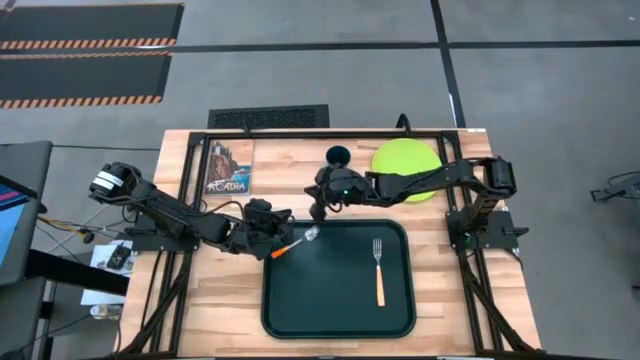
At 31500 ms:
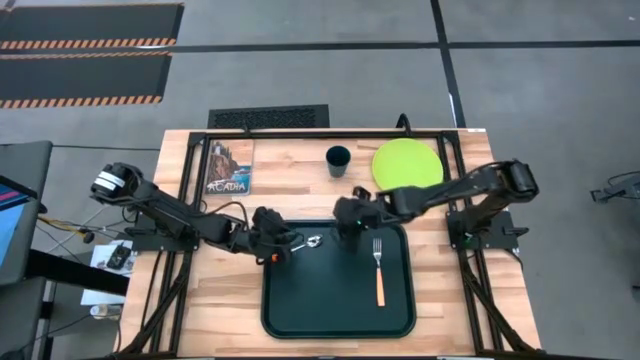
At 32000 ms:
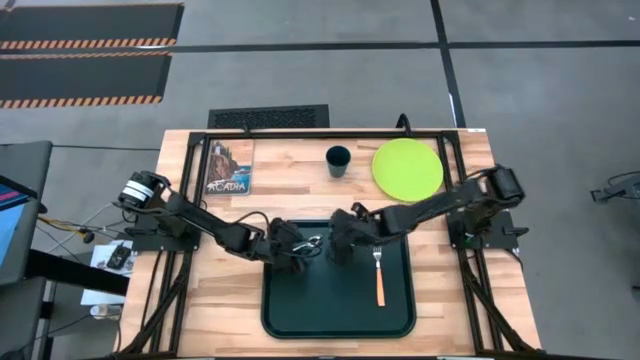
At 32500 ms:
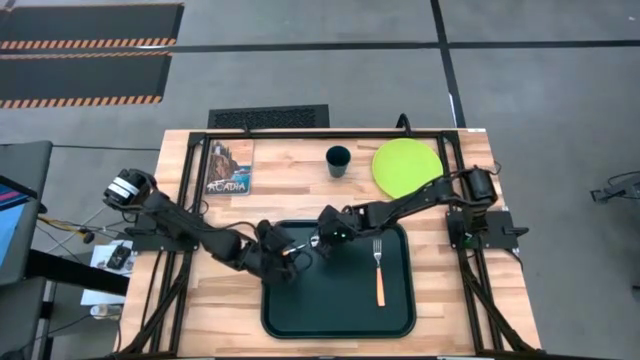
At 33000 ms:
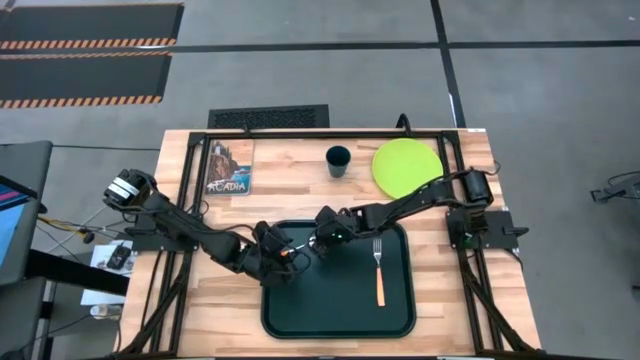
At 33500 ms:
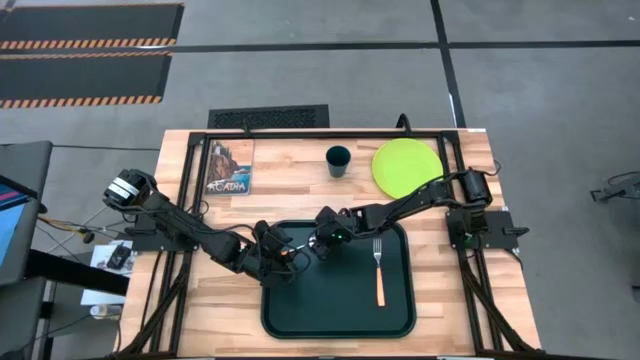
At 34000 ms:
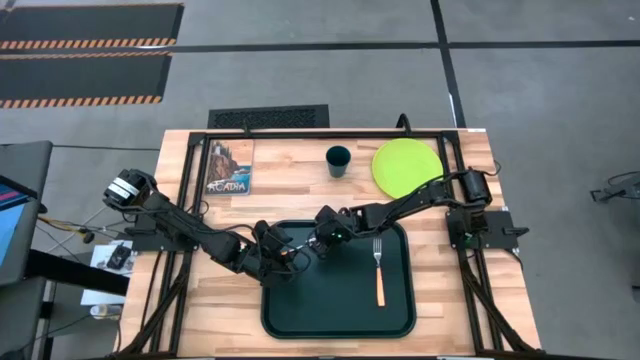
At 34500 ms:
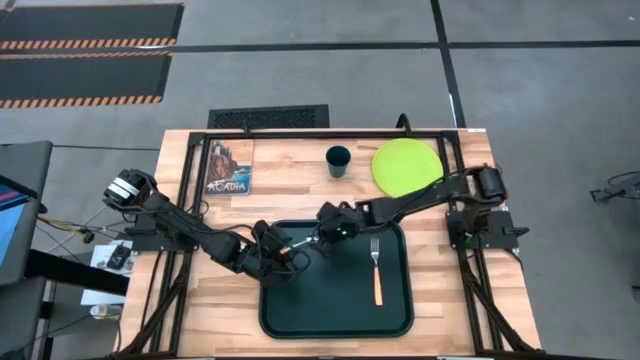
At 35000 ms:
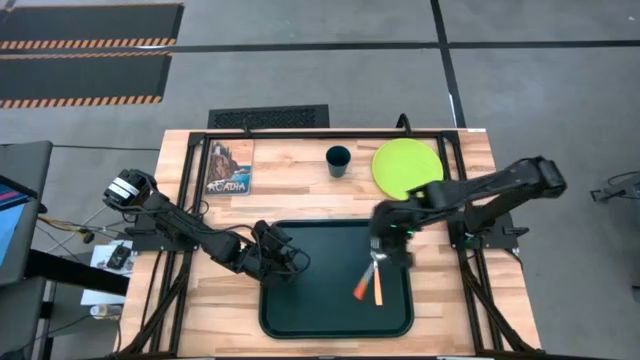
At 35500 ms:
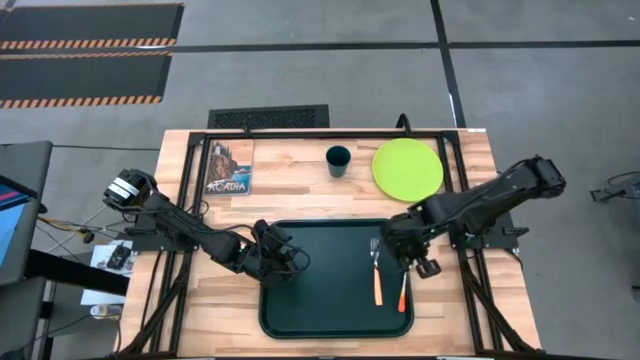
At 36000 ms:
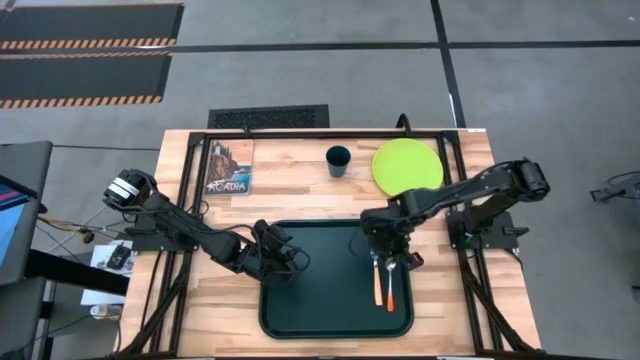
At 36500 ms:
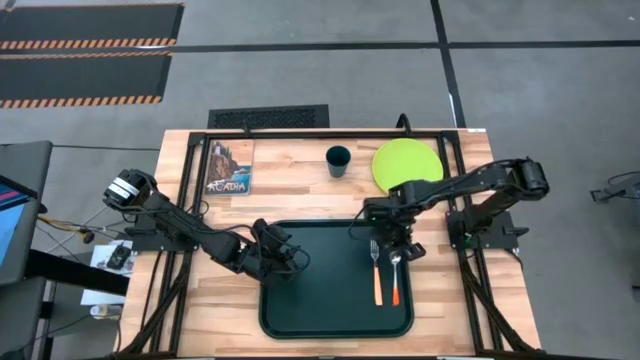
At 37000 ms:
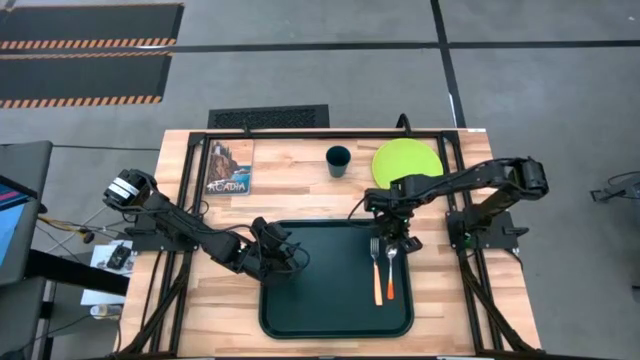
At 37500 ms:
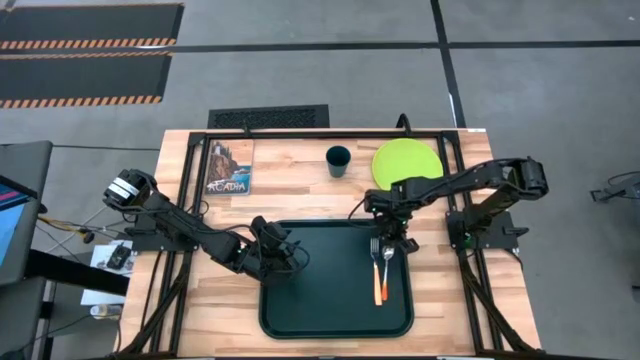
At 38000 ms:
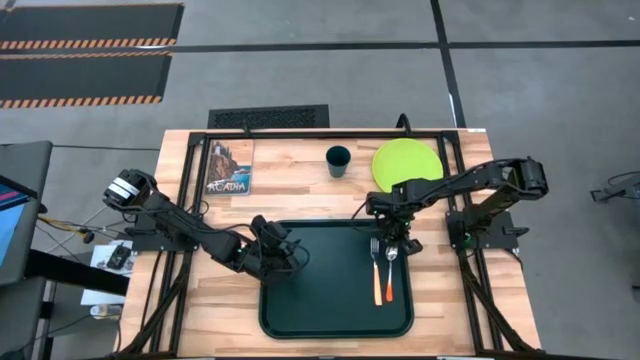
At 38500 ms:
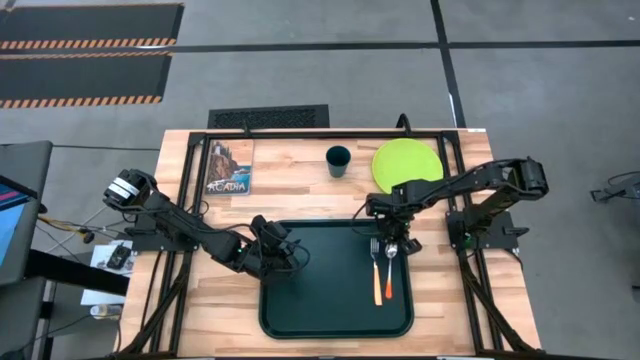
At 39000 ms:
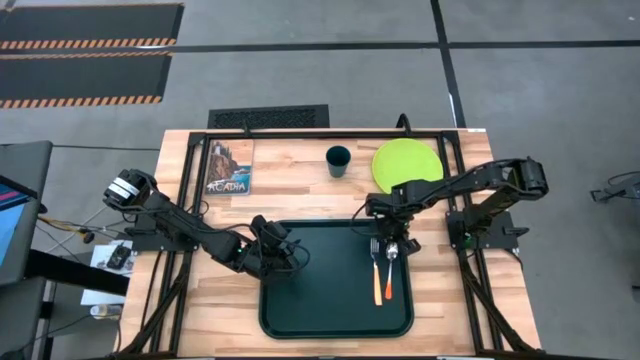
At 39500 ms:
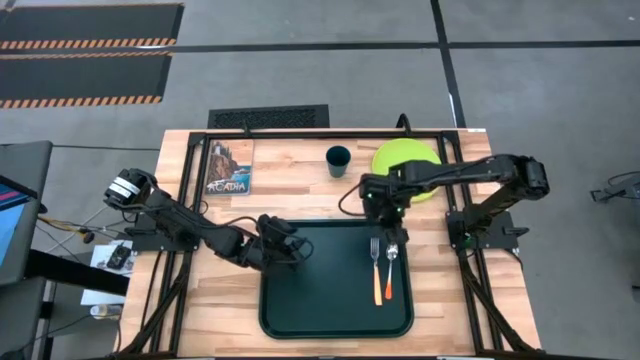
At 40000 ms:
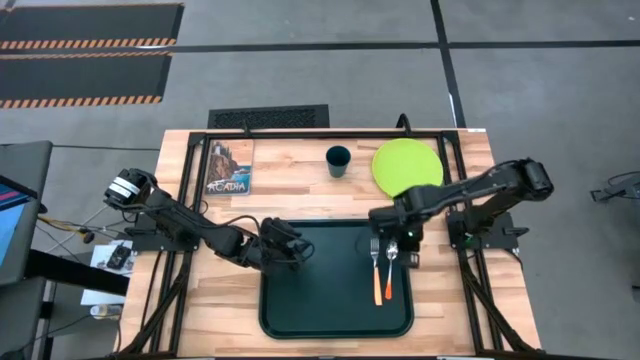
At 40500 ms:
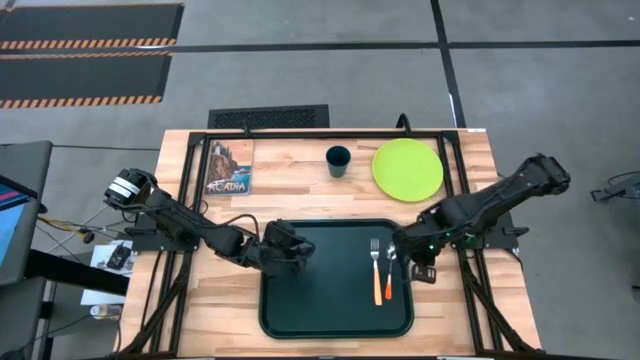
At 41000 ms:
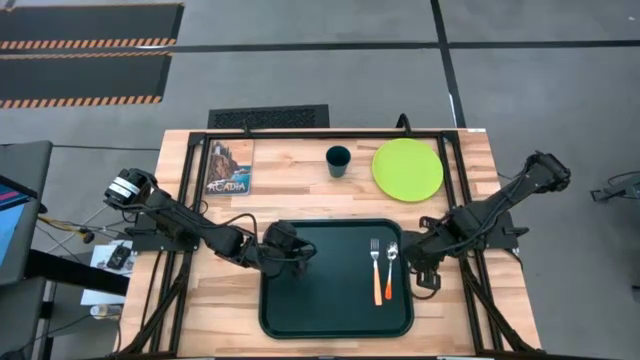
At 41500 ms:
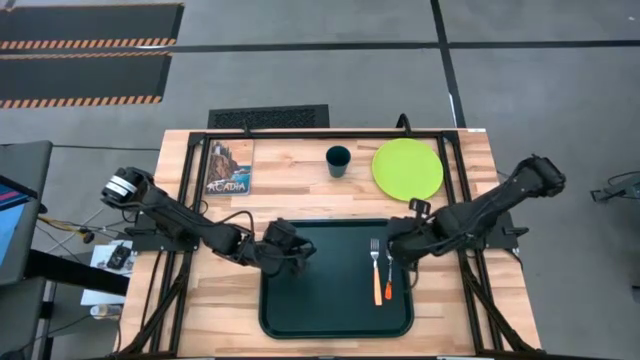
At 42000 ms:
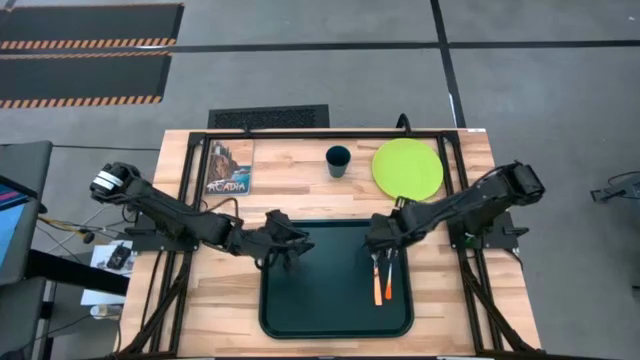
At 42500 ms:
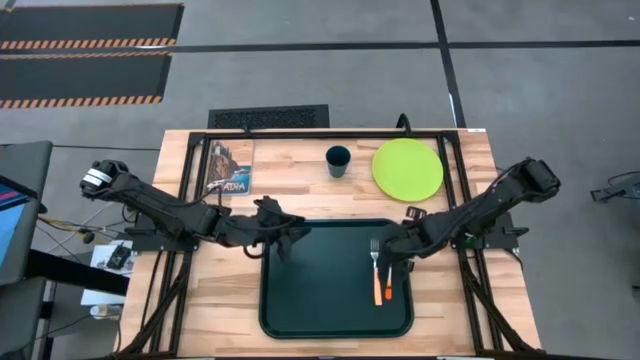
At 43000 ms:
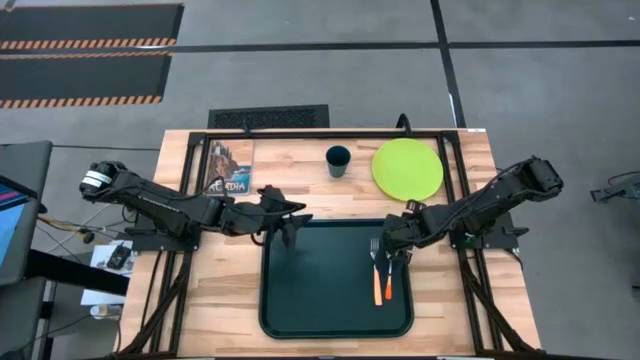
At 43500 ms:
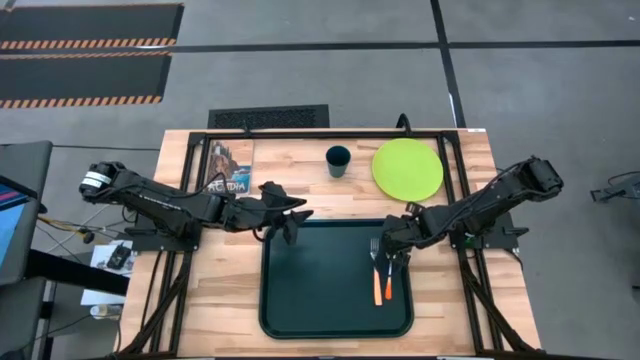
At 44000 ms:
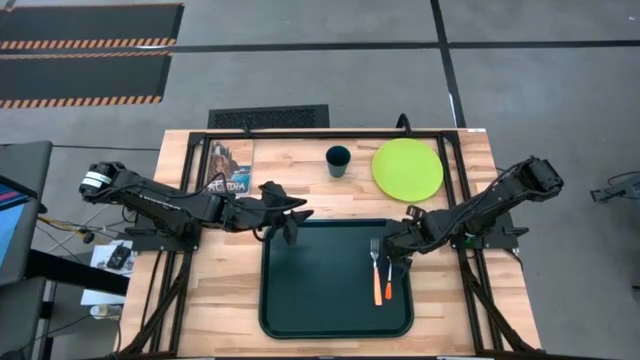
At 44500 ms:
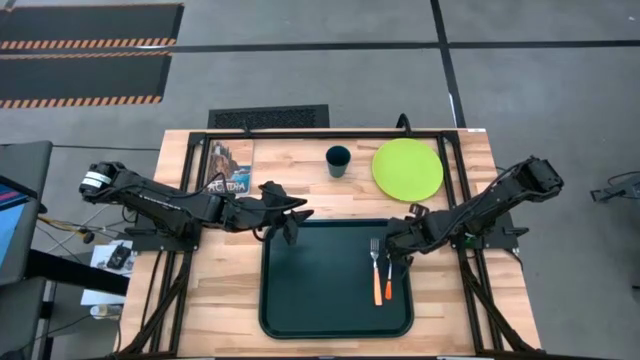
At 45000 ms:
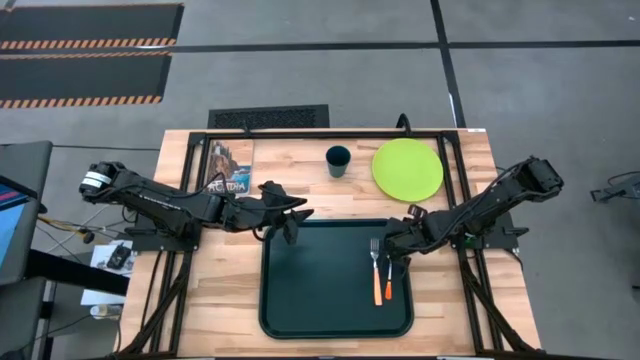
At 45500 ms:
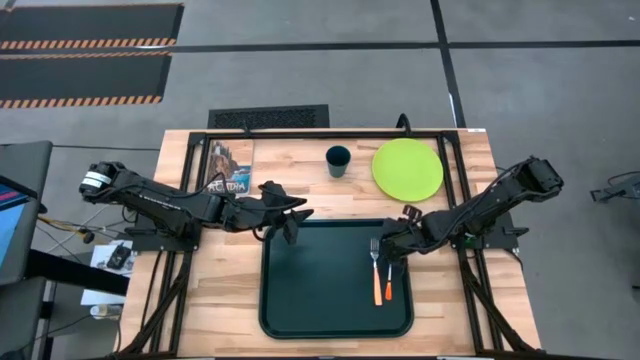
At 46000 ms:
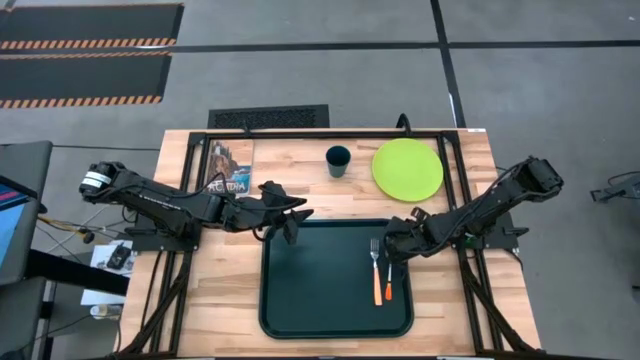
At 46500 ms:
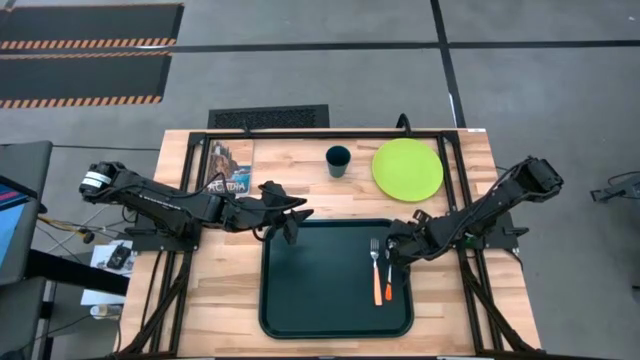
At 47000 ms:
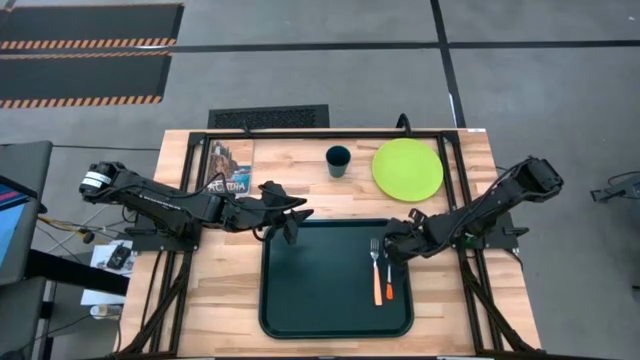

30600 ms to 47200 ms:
Task: Pick and place plate/cup/fork/spoon on tray
Put the orange spoon on the black serving tray to the right of the orange fork

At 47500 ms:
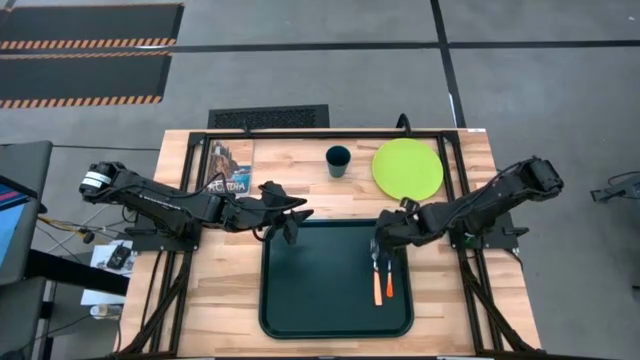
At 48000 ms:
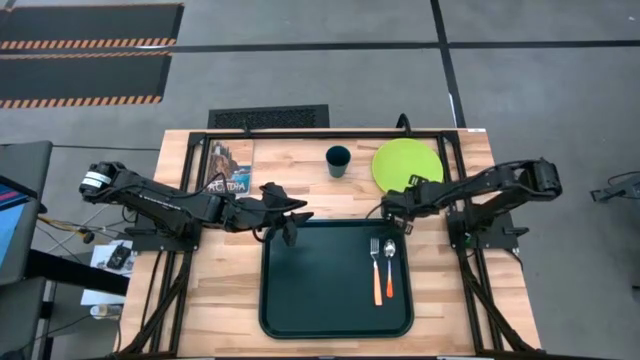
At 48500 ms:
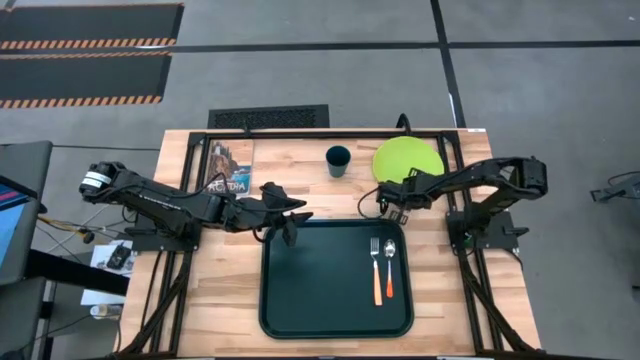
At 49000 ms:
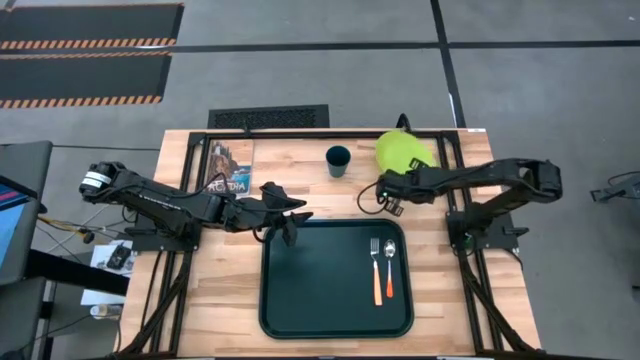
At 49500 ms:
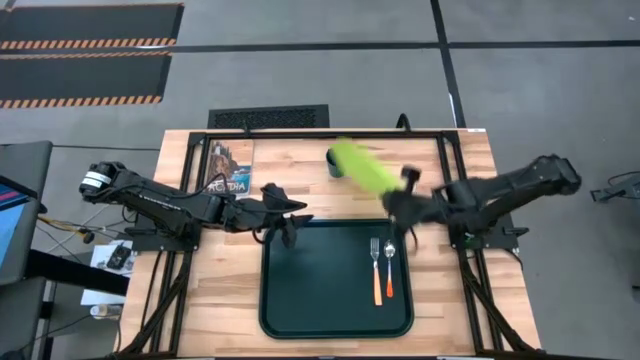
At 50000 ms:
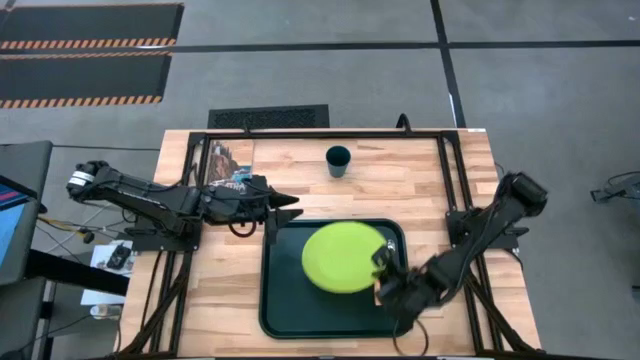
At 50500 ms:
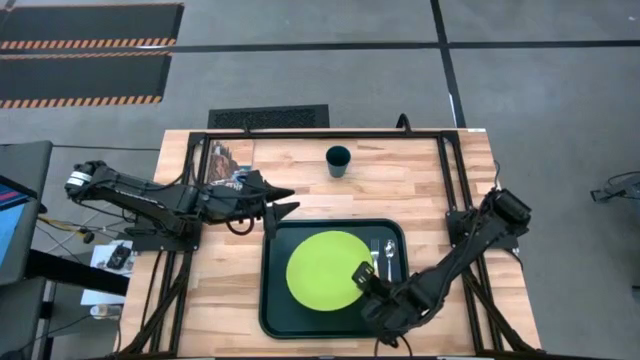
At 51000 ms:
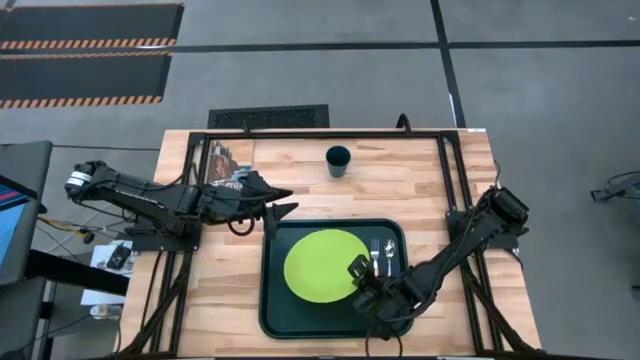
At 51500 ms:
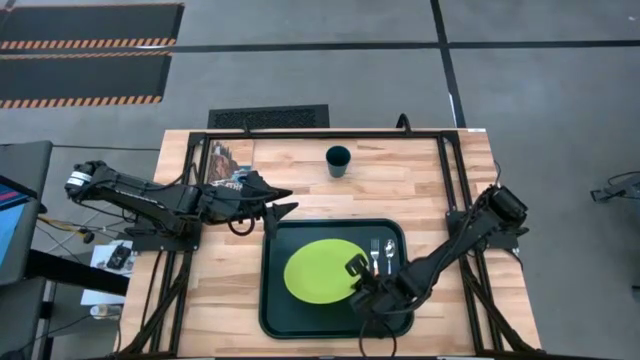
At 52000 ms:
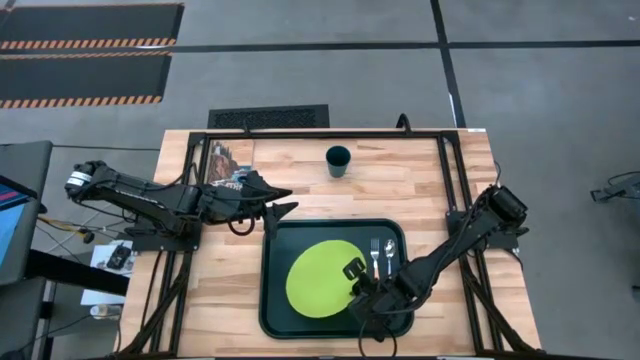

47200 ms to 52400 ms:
Put the green plate on the black serving tray to the left of the orange fork
